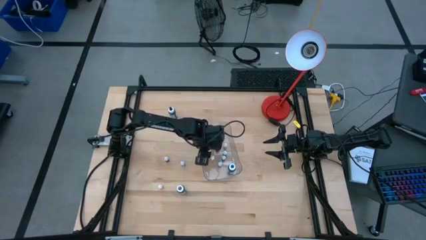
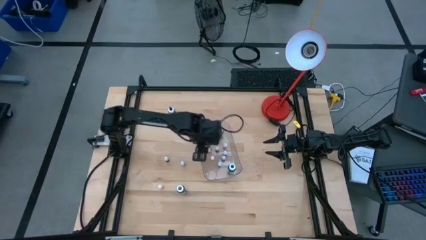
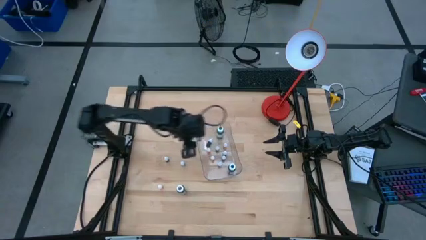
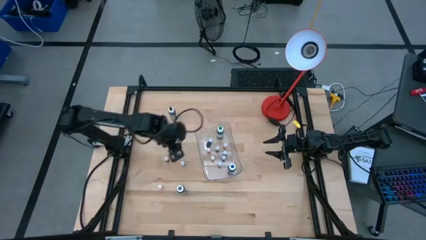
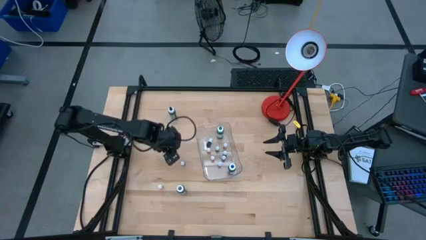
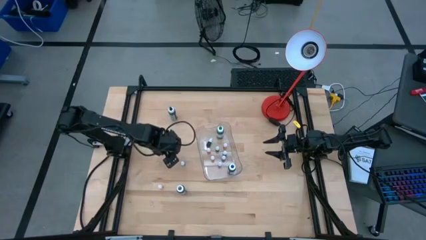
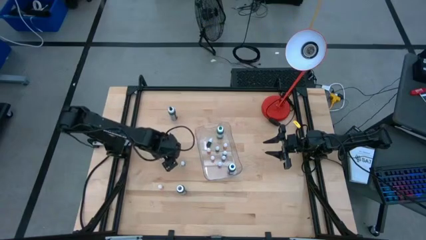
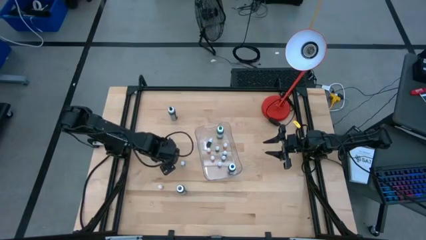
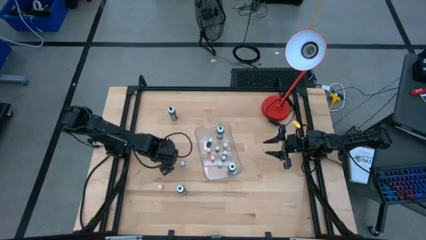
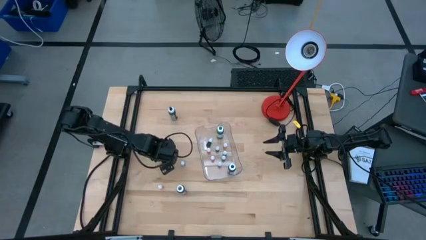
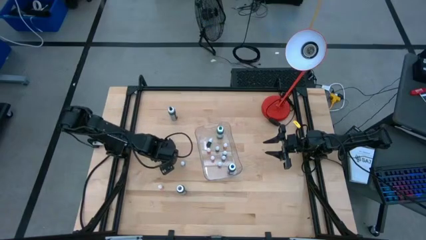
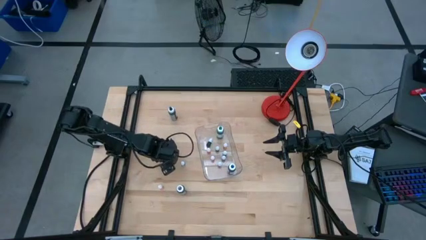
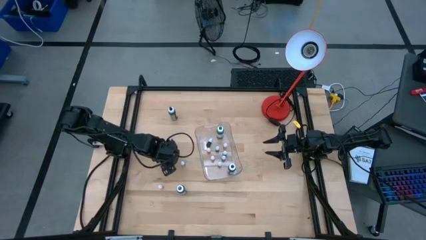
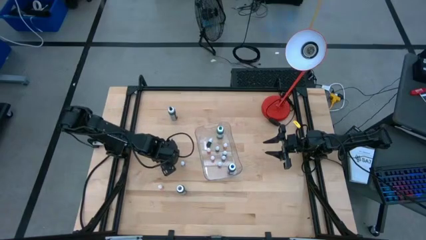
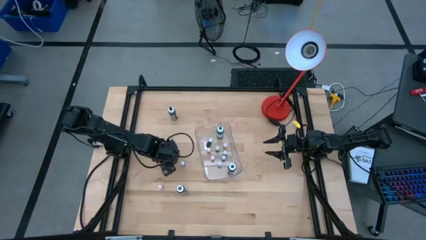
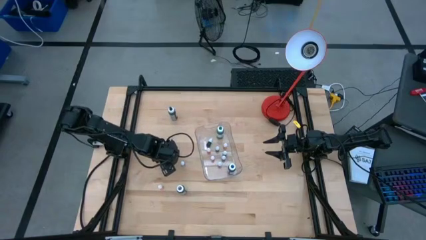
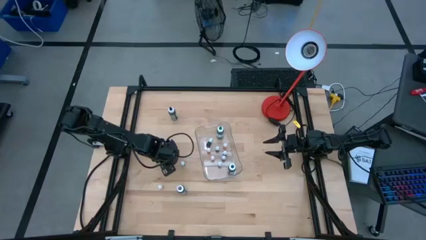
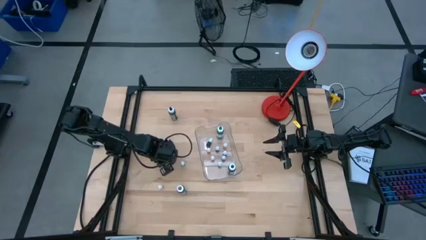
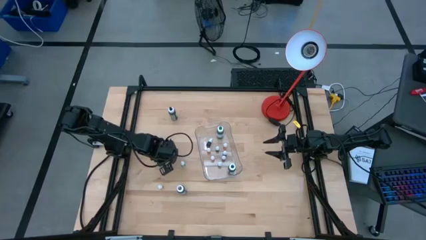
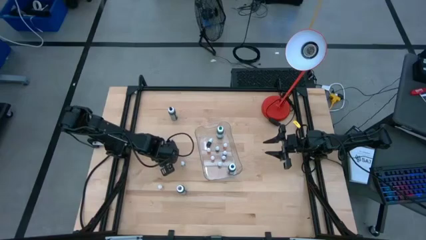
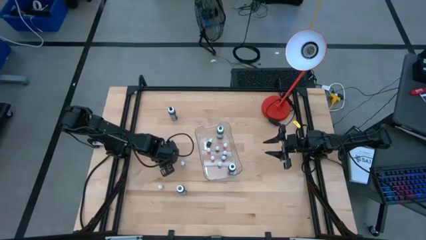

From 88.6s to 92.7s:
Task: Pick & Place food coloring
Put the small red food coloring bottle into the transparent bin

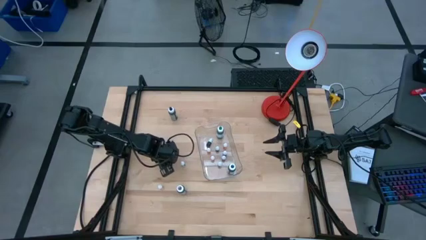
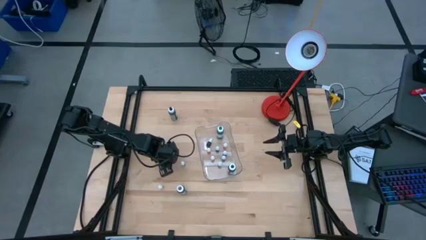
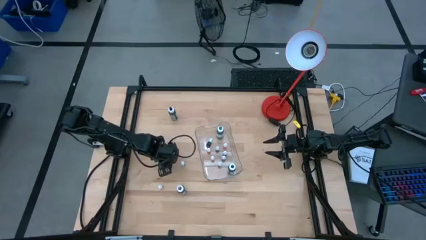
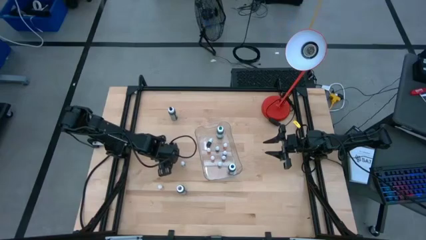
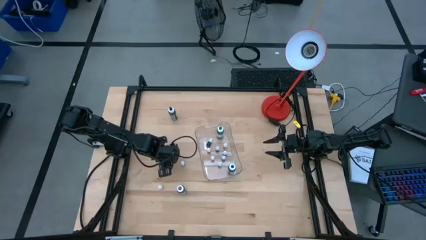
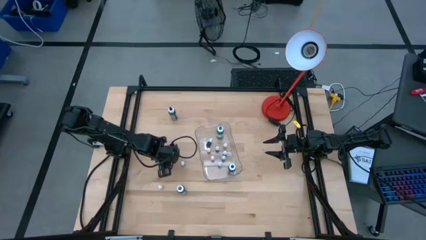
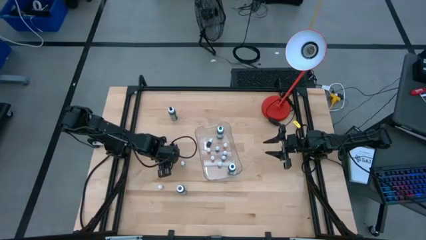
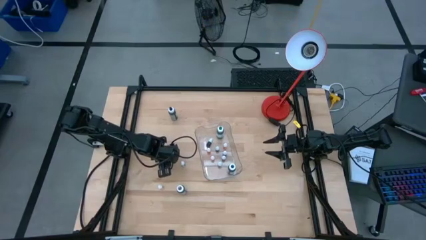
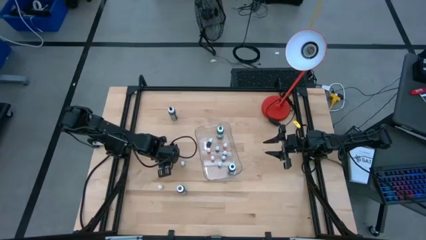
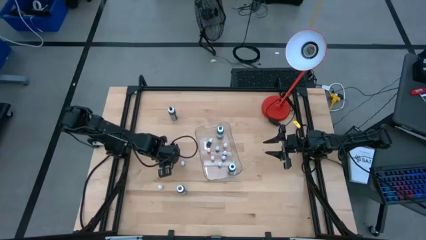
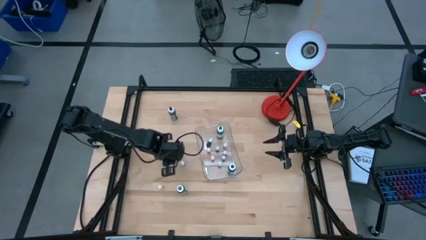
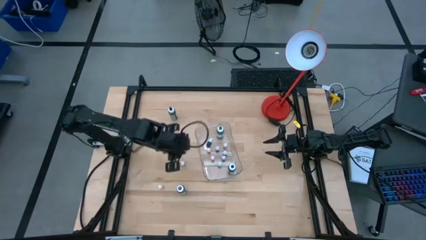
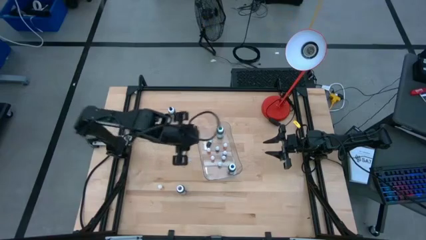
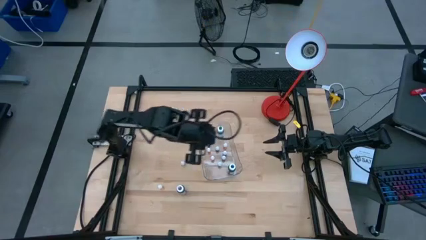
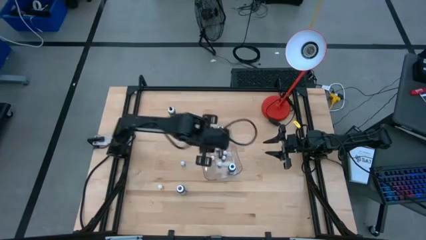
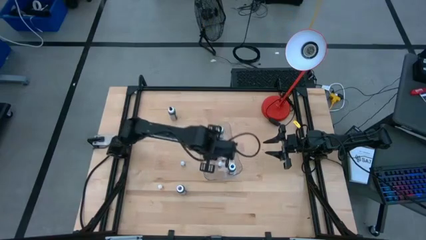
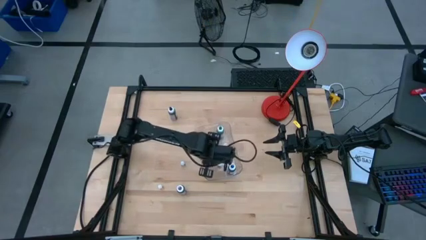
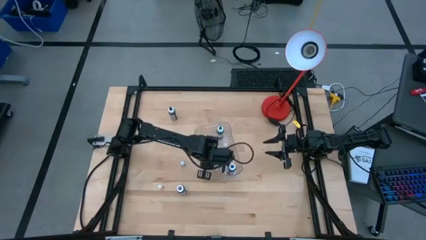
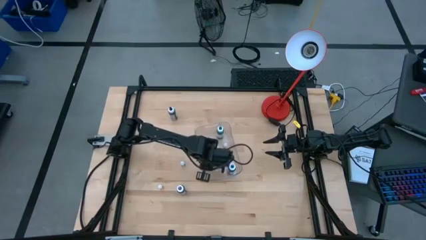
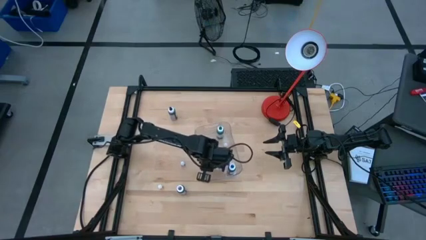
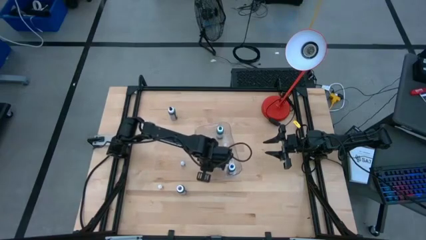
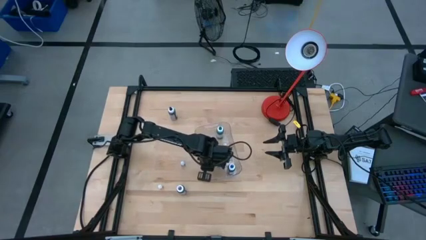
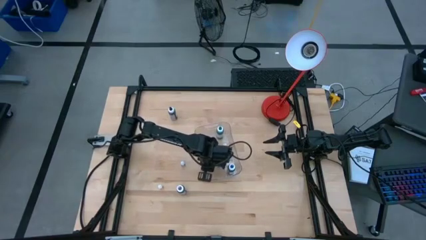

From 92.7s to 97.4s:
Put the small red food coloring bottle into the transparent bin

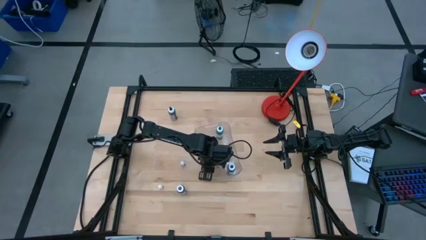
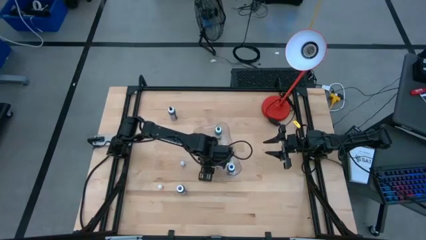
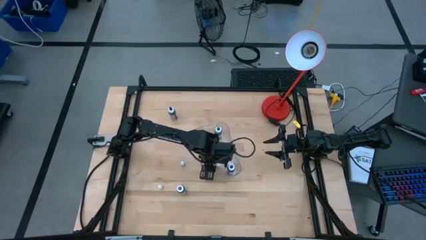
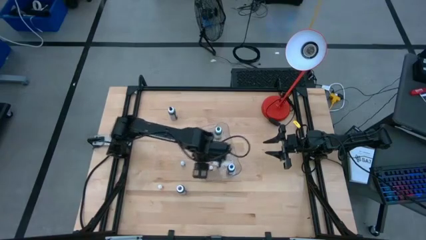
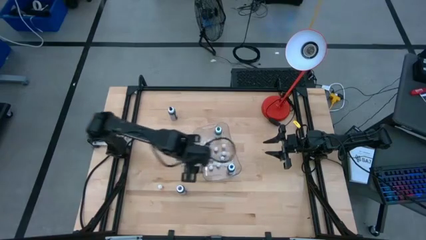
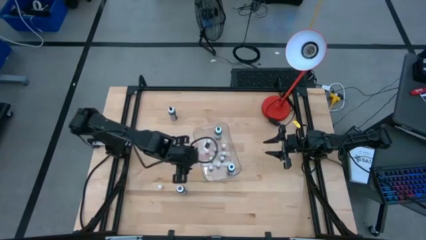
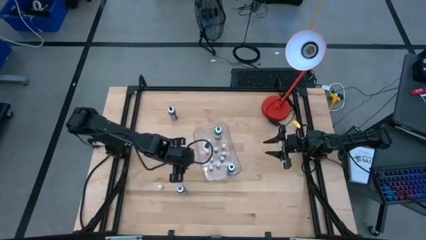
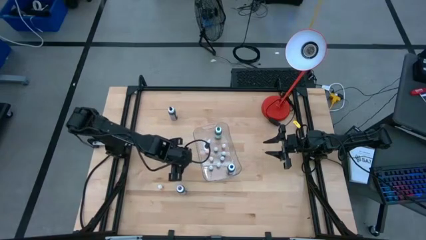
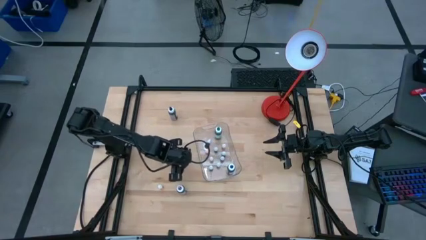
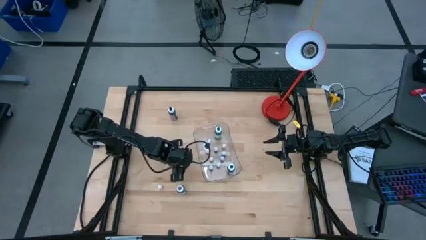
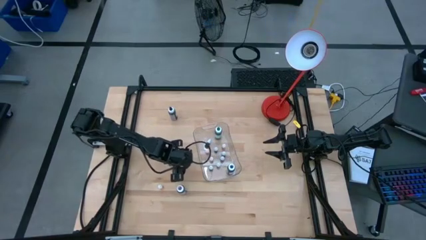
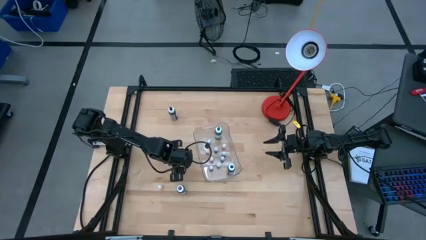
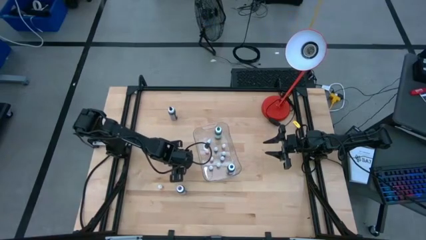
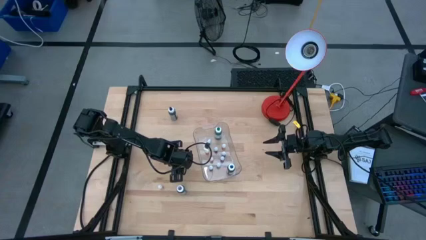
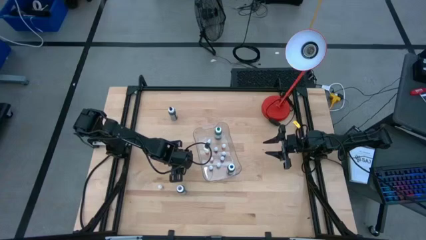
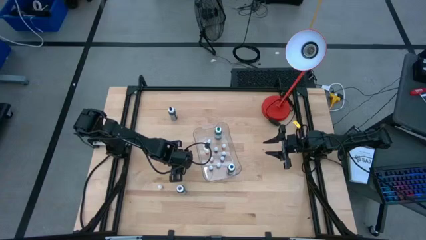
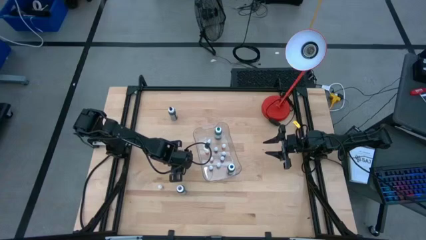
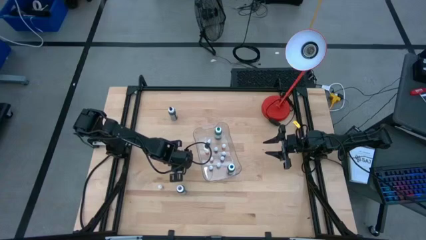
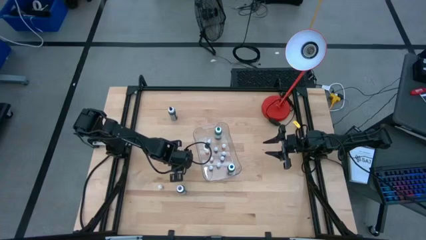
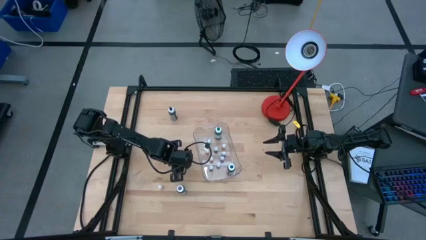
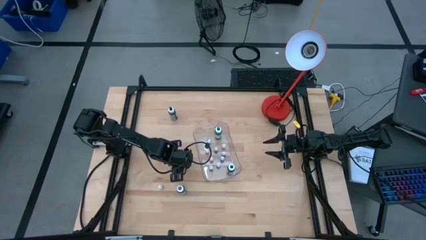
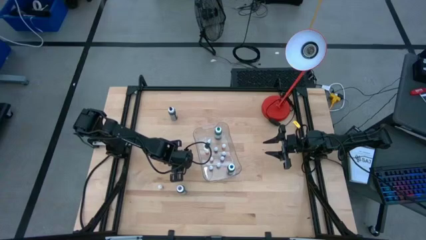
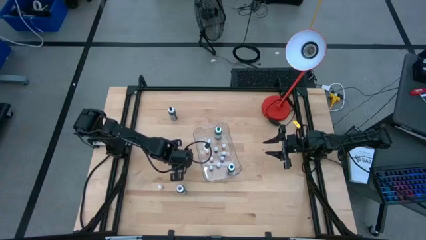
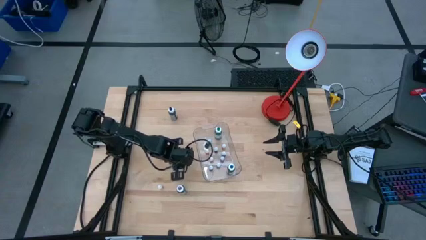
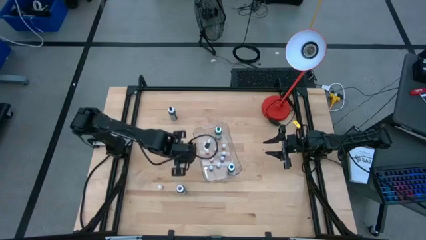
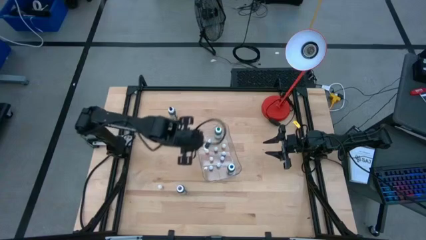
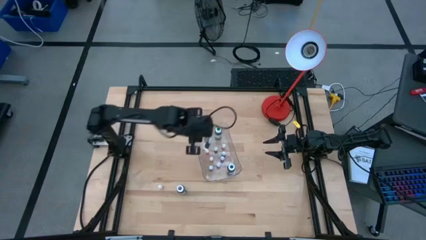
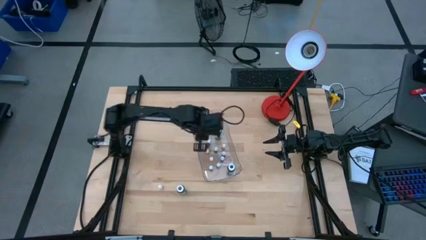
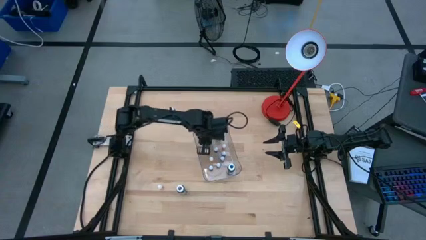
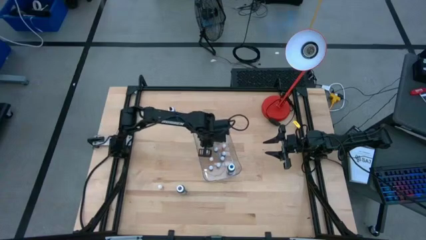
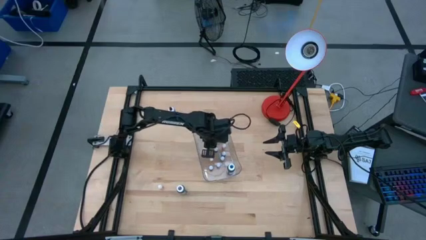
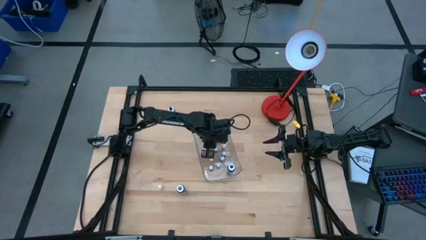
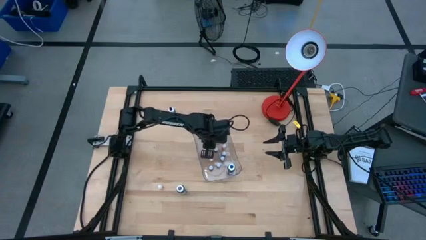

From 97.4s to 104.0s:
Put the small black food coloring bottle into the transparent bin

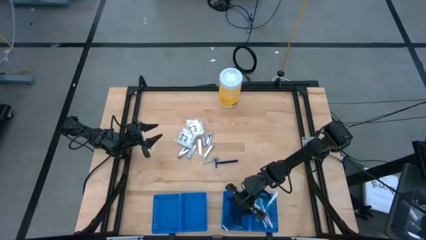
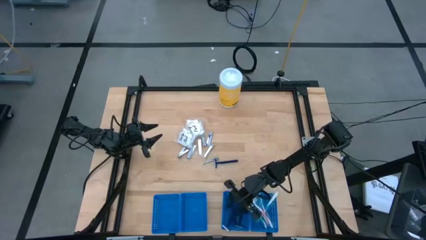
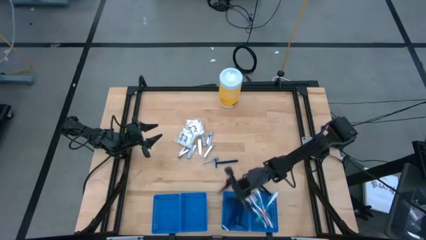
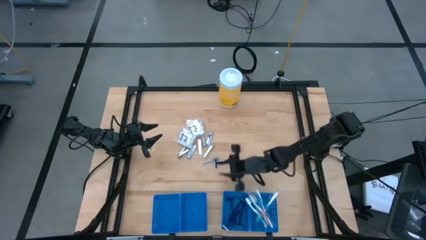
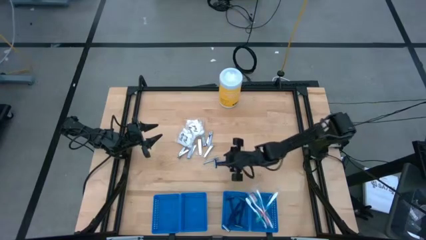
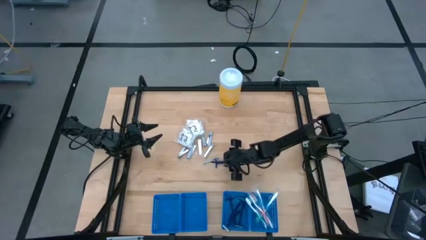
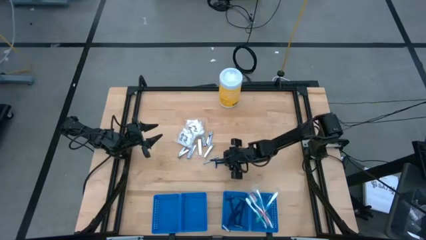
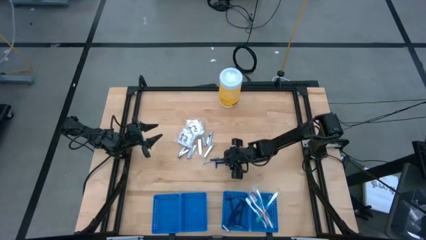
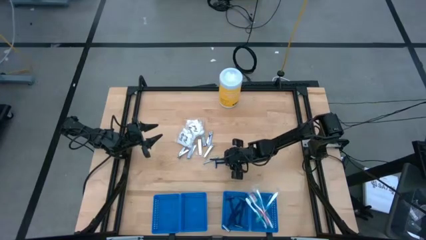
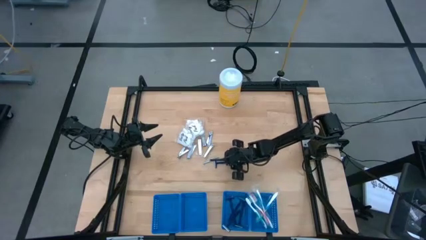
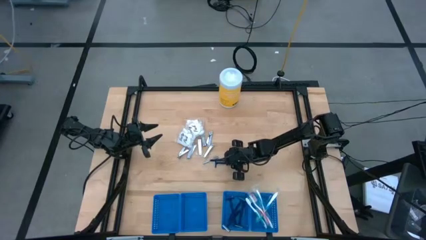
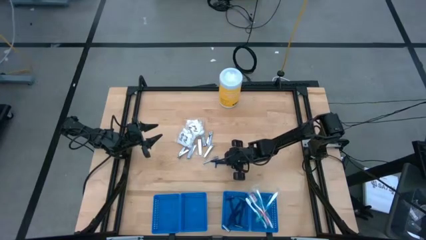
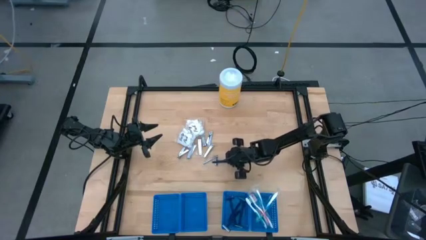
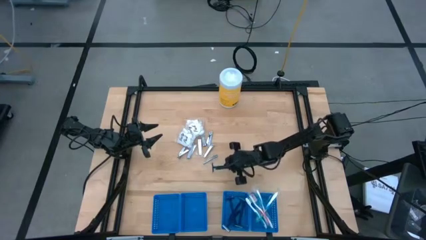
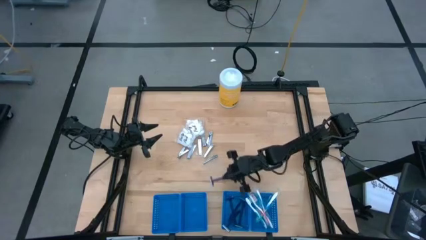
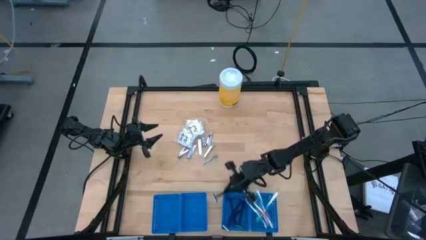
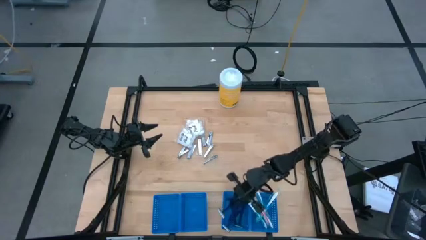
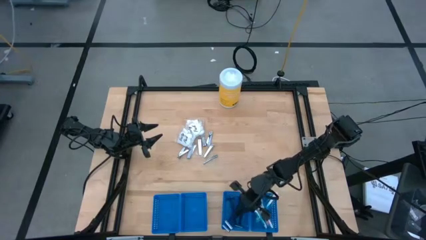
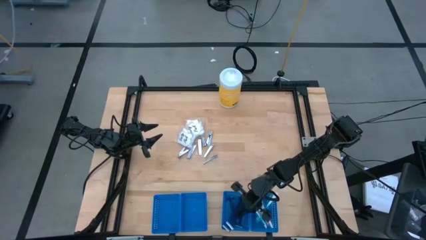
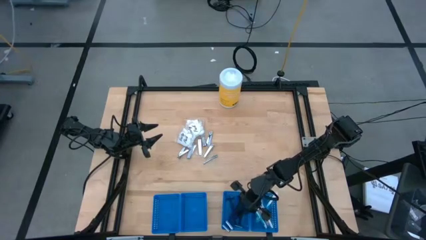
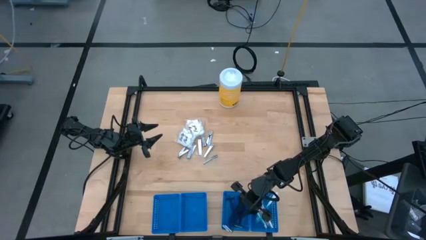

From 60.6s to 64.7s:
Task: Pick & Place Travel size toiletries
Put the blue razor into the blue basket
